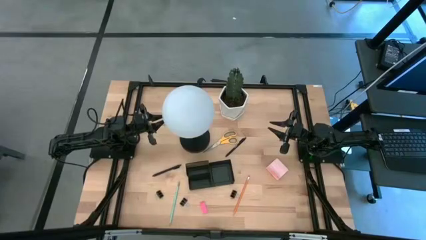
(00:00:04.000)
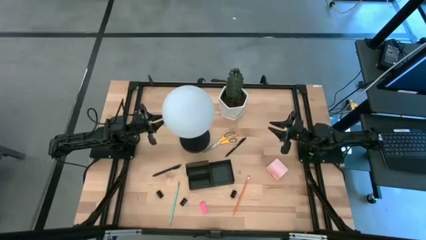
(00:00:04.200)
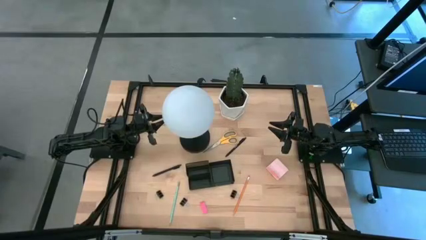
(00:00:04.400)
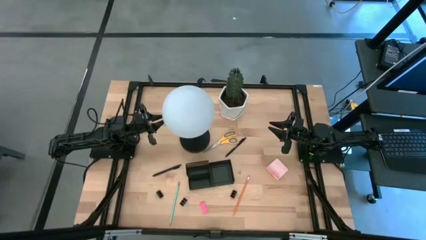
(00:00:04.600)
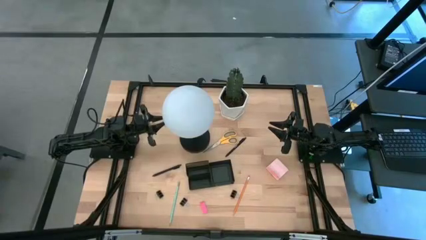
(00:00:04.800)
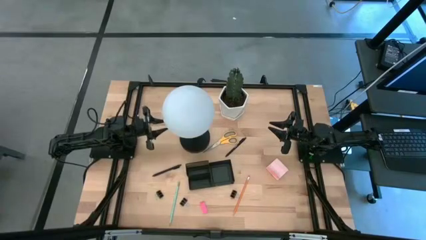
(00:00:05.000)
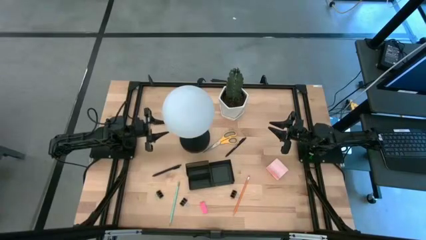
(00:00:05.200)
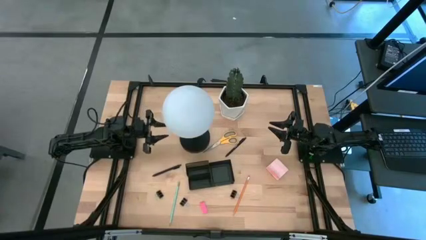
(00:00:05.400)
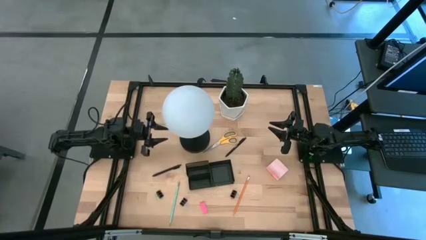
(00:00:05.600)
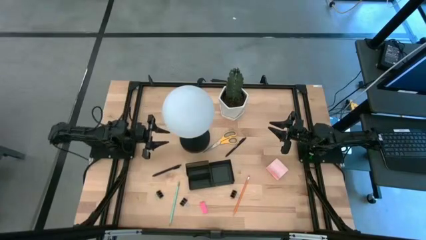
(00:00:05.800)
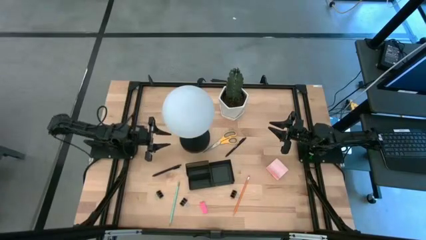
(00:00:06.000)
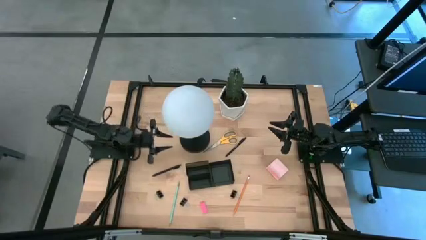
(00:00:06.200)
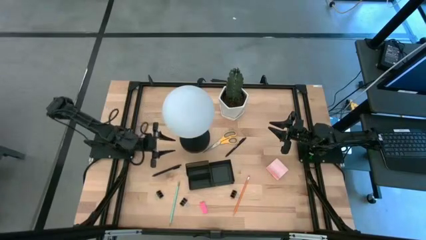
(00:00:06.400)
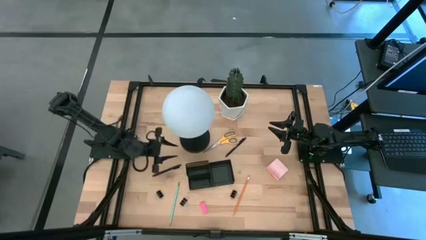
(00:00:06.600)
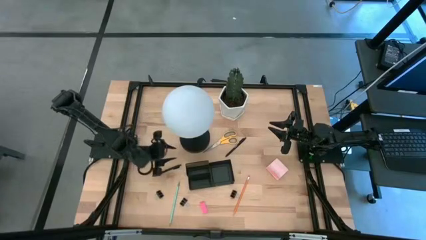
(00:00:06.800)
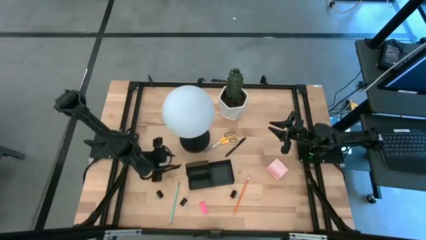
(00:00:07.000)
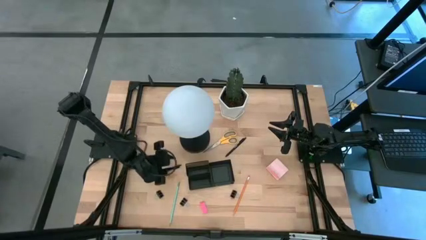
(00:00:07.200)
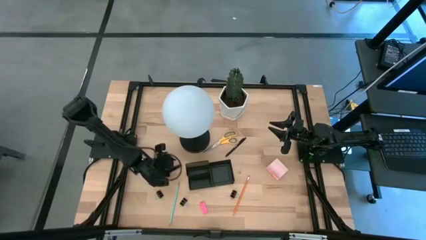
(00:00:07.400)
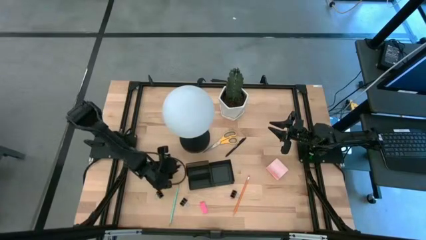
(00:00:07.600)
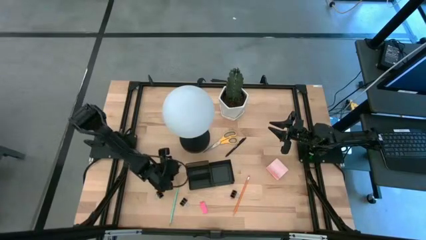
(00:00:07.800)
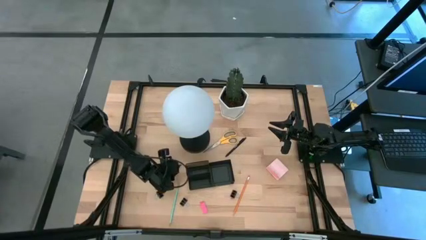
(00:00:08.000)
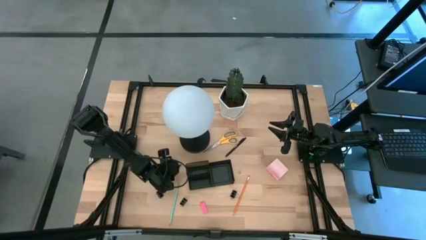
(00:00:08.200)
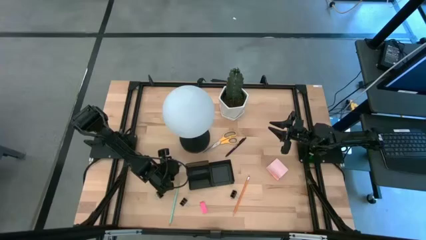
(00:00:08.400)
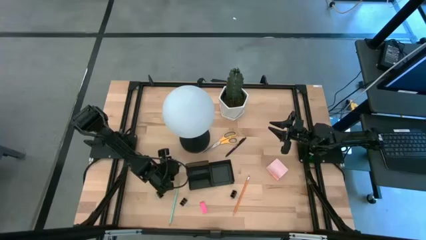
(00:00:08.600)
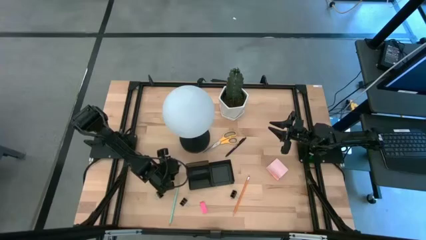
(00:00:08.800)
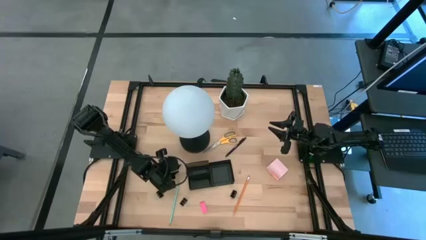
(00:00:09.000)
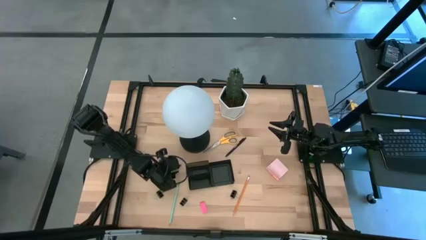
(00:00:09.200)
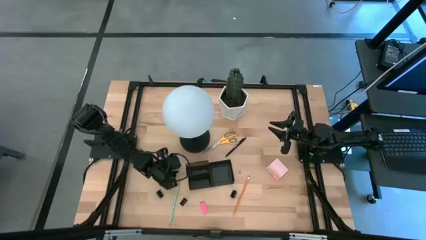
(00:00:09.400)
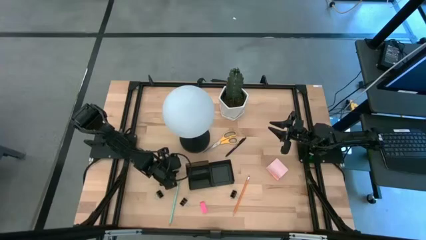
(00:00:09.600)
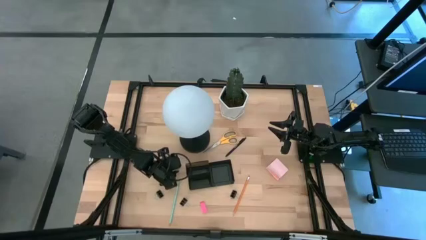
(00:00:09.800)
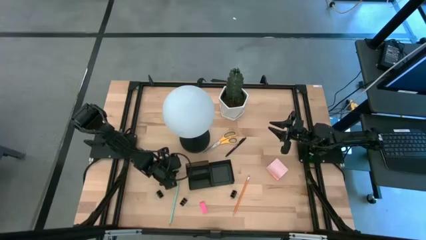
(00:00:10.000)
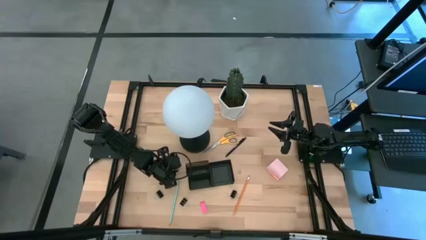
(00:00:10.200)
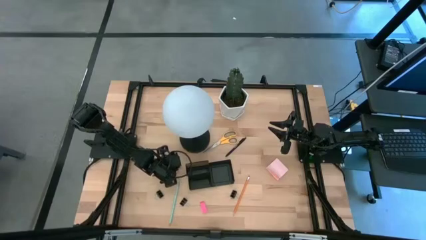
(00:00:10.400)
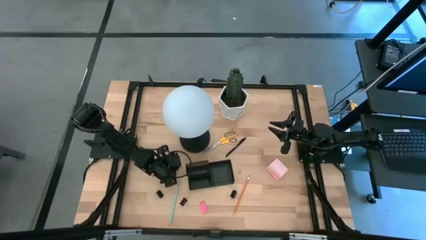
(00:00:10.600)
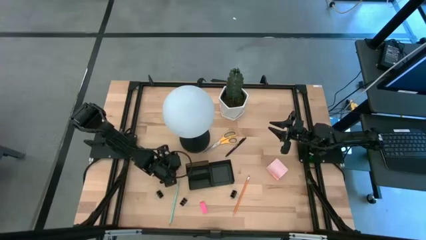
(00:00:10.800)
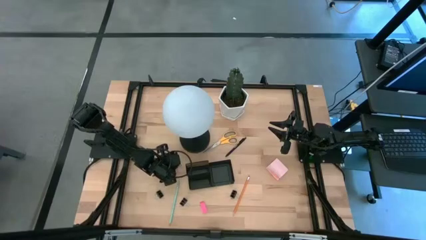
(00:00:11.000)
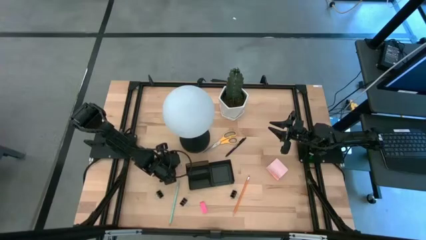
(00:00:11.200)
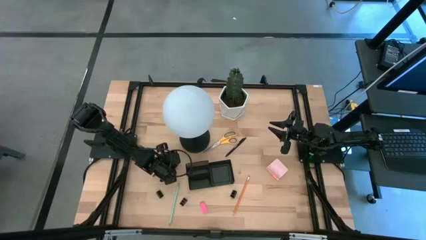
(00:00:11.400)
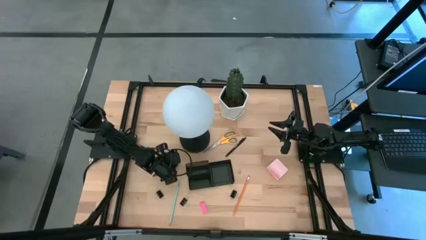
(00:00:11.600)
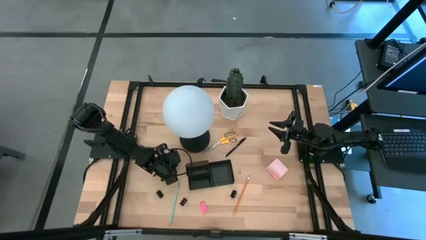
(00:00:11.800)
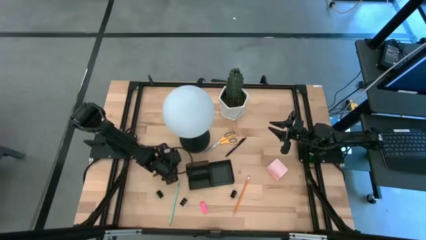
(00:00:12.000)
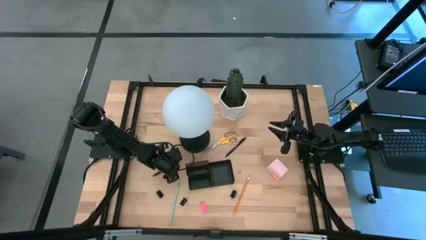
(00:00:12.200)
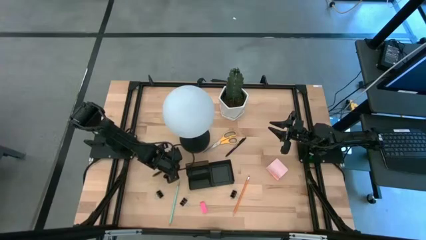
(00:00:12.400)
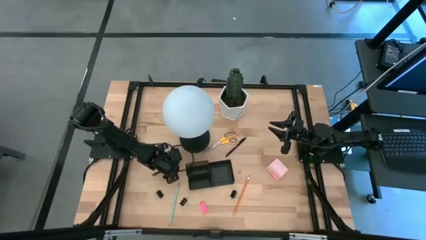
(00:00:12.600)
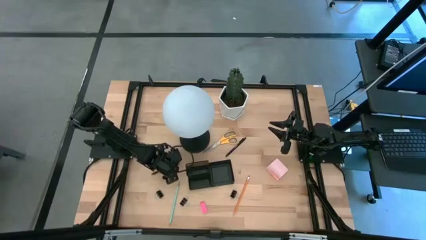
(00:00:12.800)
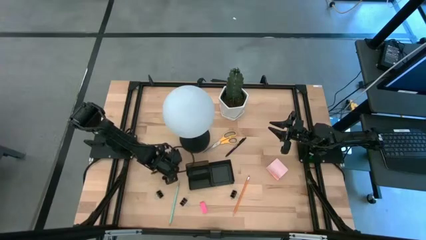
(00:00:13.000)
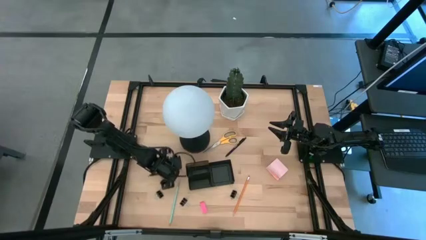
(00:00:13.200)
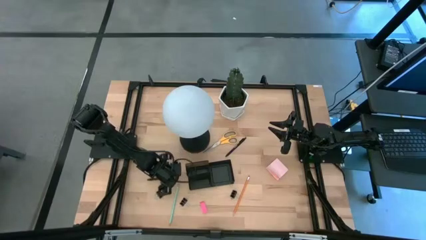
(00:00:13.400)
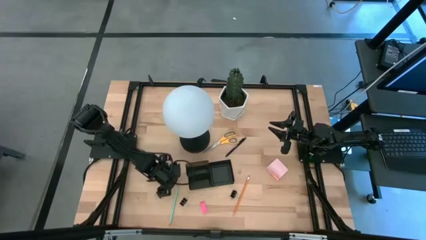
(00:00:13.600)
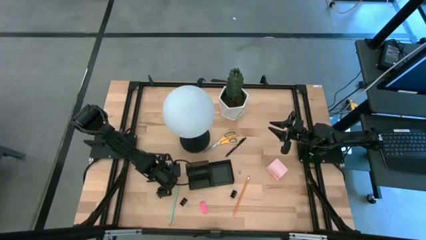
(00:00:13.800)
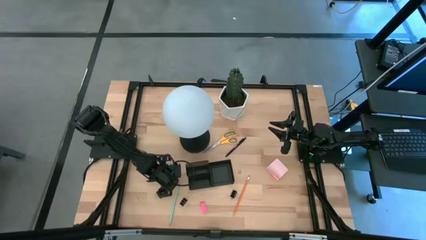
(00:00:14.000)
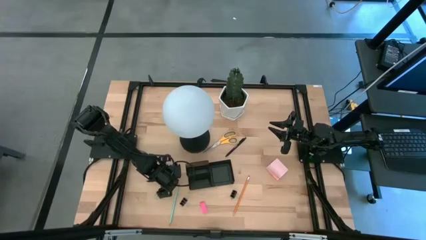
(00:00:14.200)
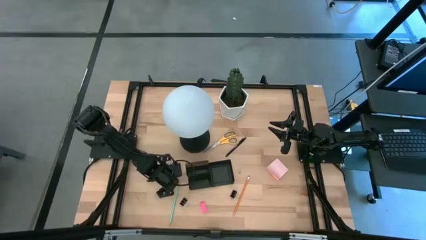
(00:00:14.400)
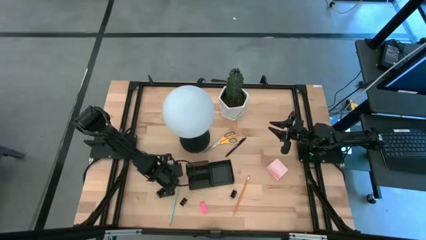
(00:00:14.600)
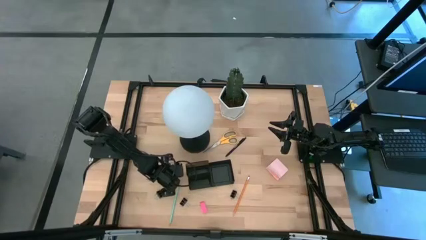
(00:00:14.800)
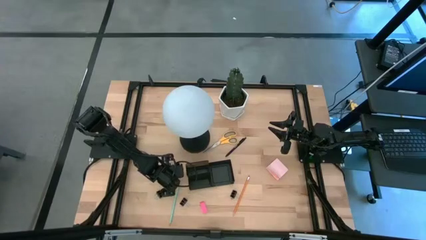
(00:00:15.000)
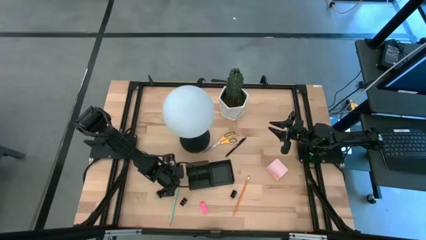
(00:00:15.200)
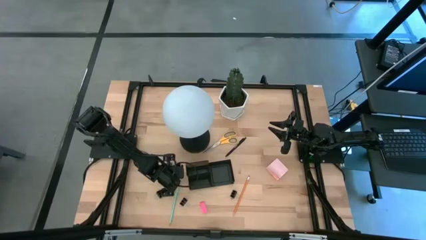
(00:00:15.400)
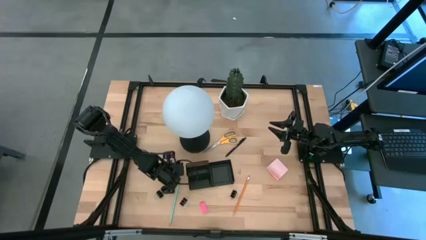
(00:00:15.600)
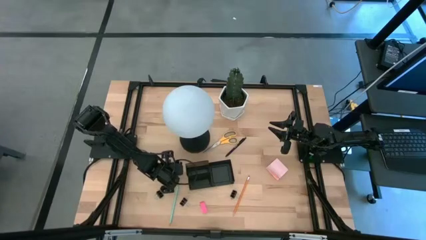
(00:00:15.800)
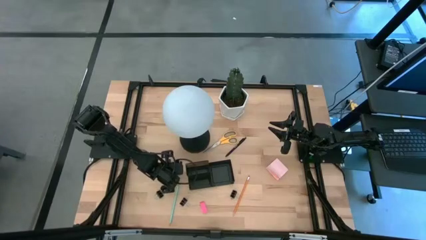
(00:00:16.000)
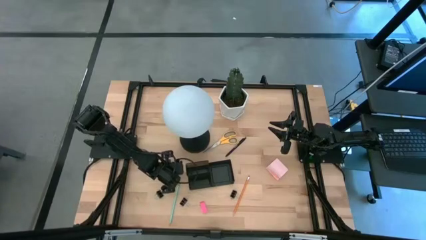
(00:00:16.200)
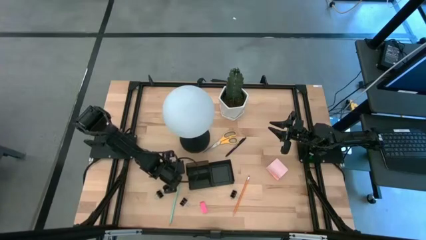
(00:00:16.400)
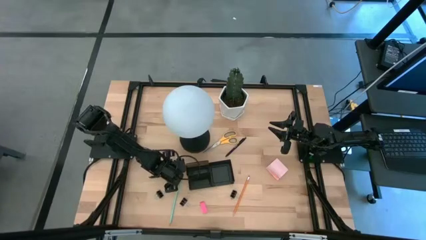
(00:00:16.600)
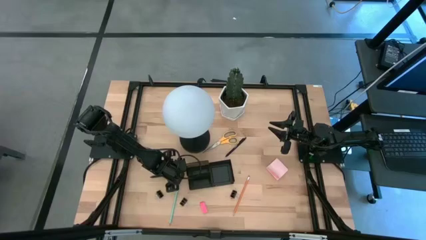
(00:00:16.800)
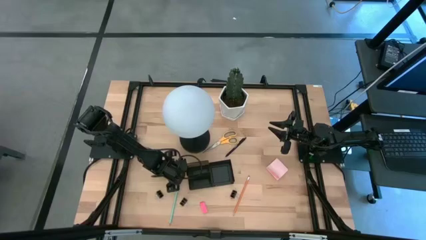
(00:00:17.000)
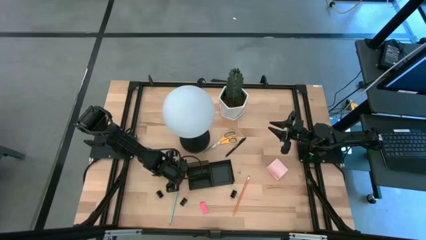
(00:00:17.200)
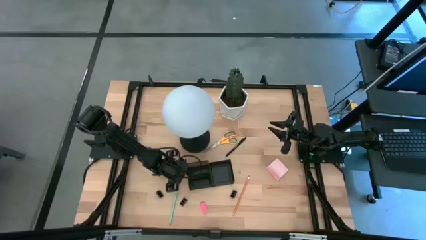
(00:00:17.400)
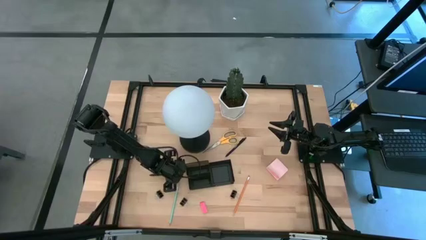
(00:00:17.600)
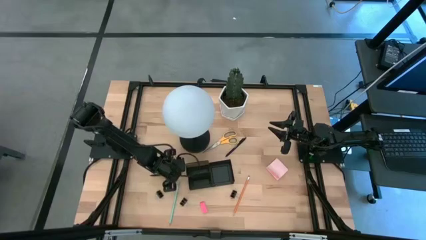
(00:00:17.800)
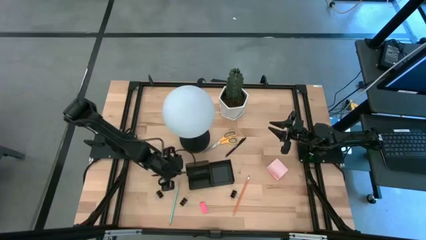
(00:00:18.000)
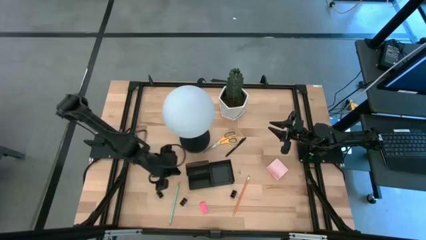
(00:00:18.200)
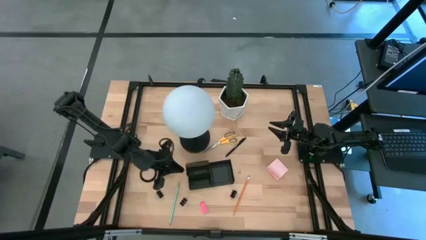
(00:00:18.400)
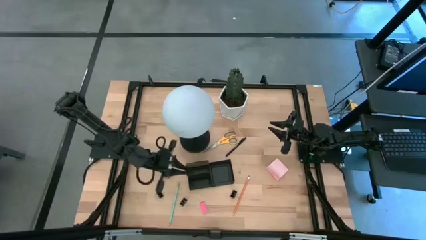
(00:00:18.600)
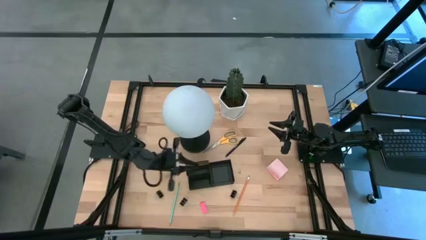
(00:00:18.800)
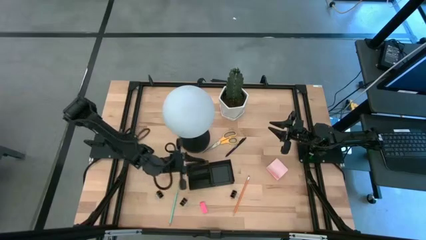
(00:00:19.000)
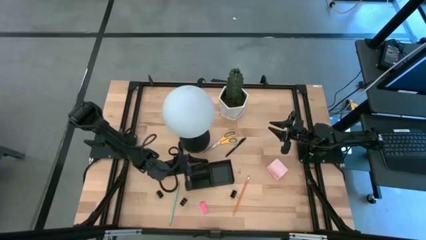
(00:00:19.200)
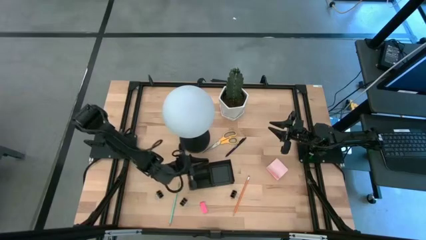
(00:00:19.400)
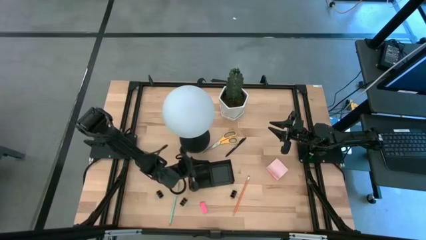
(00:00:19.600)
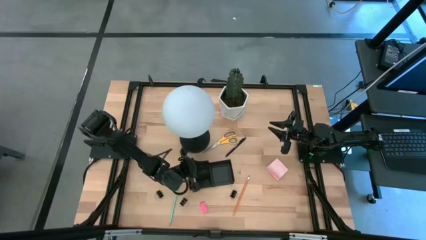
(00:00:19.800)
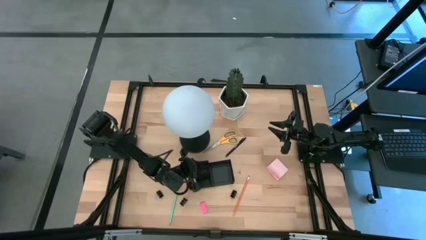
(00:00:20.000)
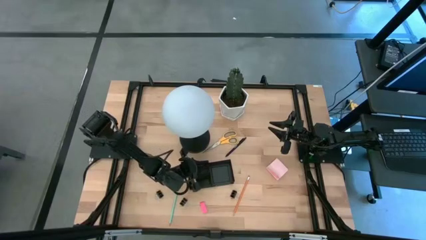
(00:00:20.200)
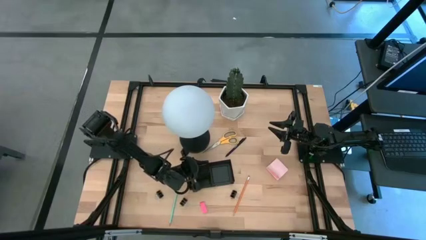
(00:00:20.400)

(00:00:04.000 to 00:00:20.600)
Task: Pick and place office supplies into organizer
Put the left black pen into the desk organizer
